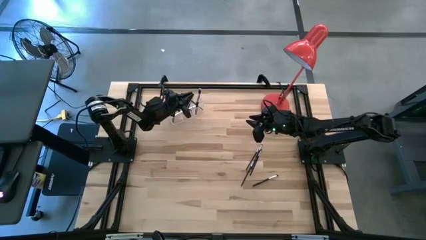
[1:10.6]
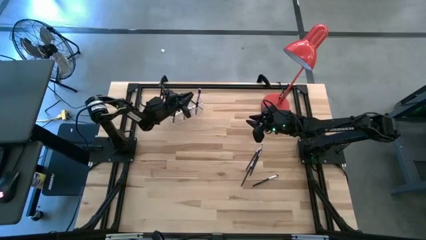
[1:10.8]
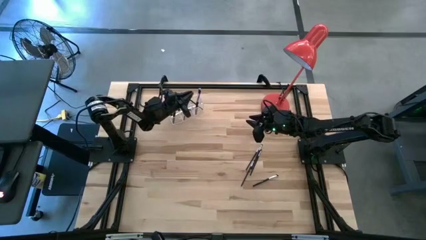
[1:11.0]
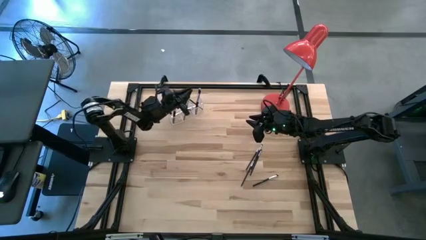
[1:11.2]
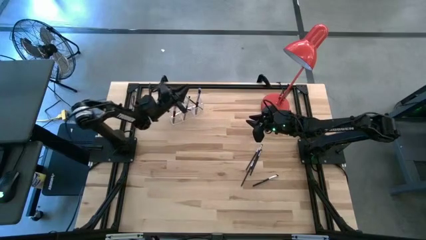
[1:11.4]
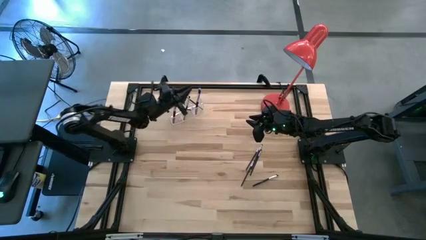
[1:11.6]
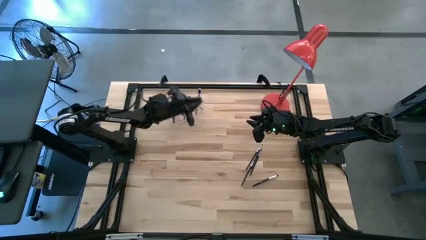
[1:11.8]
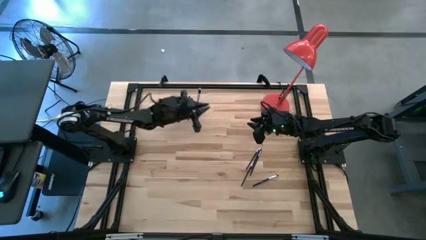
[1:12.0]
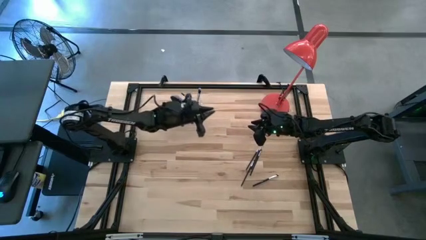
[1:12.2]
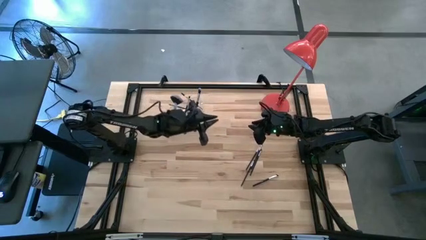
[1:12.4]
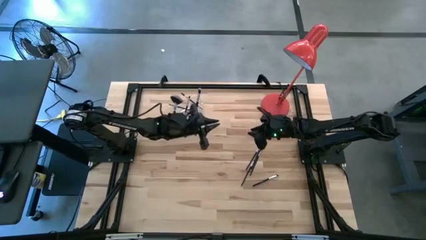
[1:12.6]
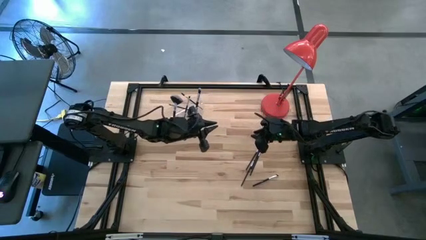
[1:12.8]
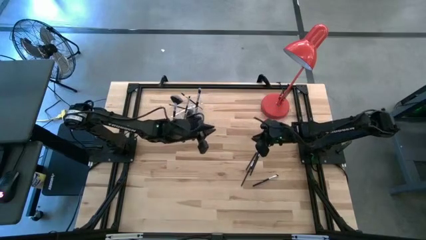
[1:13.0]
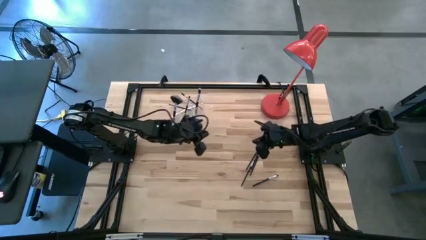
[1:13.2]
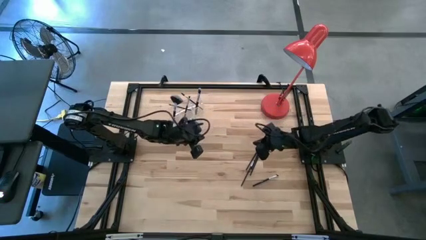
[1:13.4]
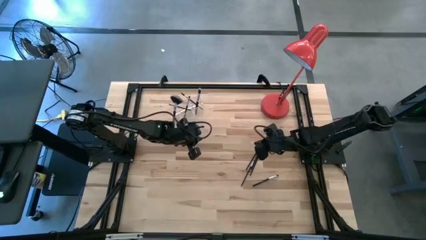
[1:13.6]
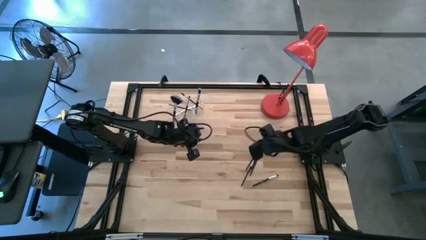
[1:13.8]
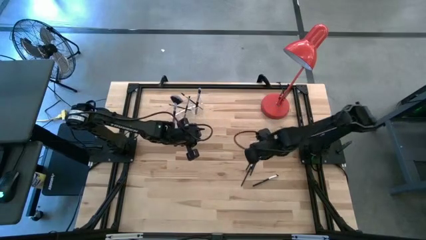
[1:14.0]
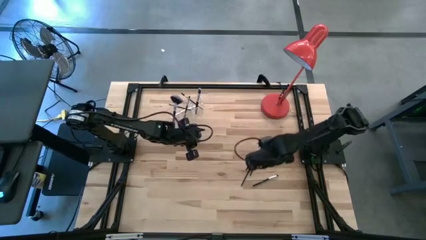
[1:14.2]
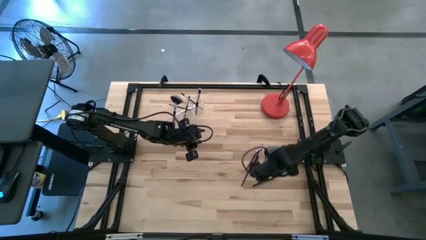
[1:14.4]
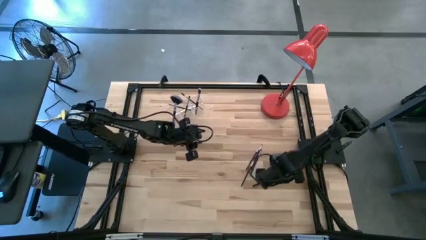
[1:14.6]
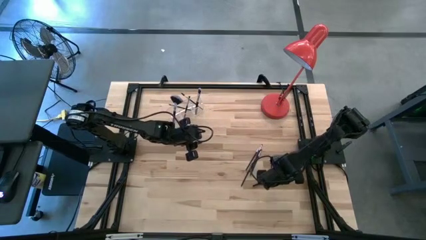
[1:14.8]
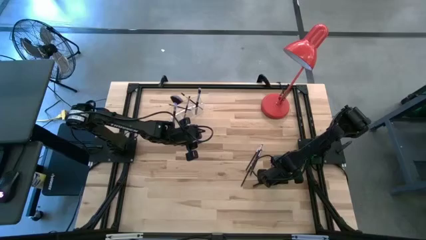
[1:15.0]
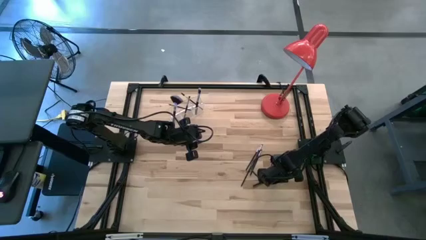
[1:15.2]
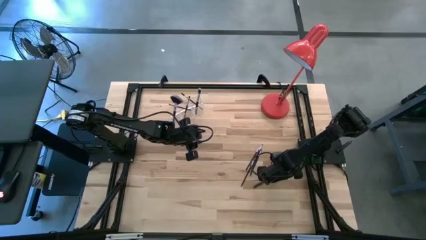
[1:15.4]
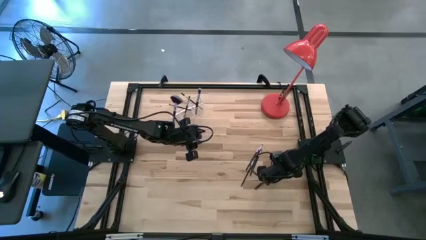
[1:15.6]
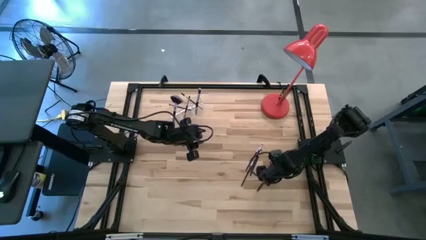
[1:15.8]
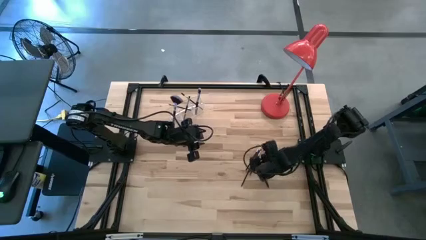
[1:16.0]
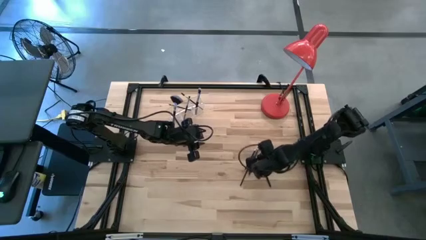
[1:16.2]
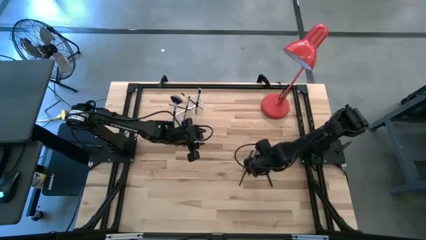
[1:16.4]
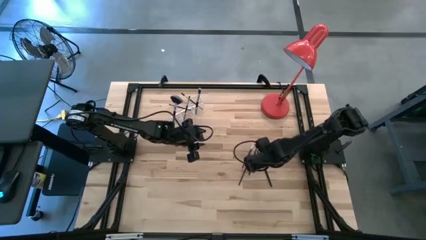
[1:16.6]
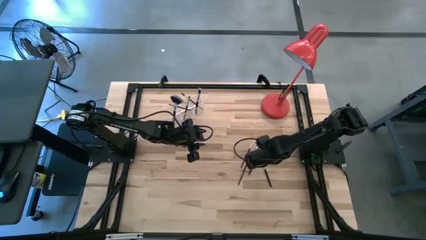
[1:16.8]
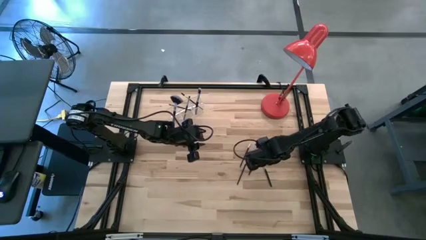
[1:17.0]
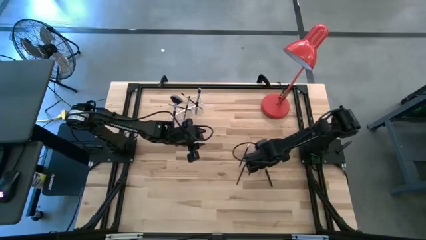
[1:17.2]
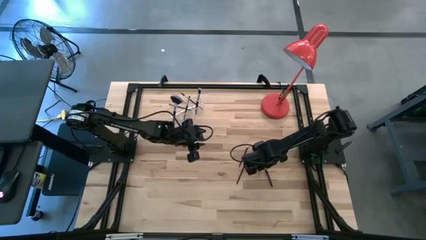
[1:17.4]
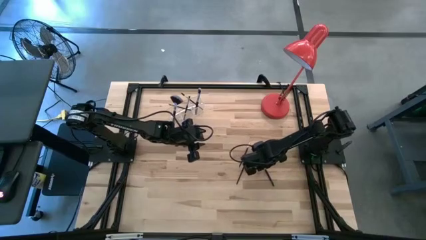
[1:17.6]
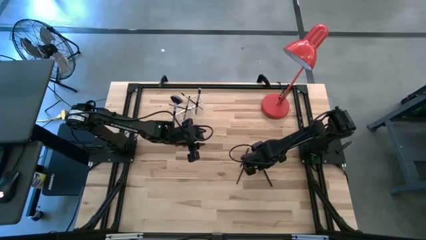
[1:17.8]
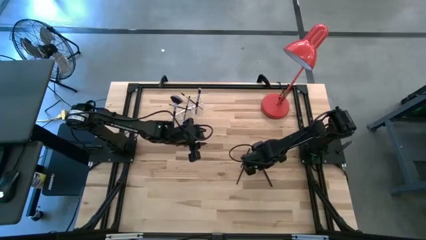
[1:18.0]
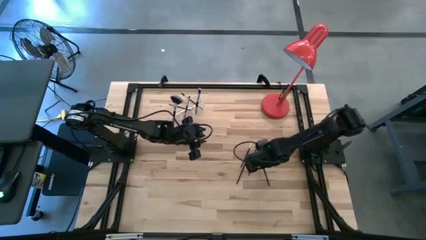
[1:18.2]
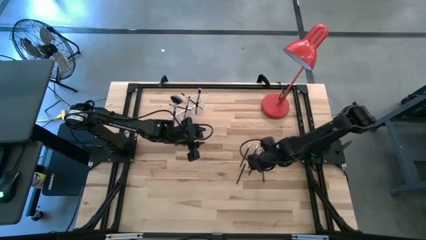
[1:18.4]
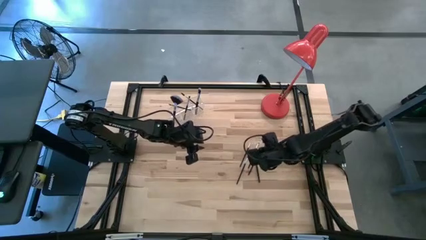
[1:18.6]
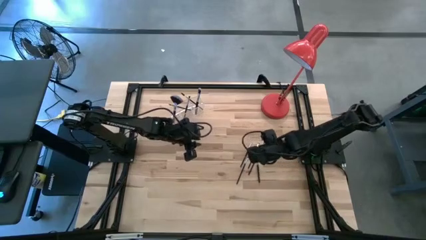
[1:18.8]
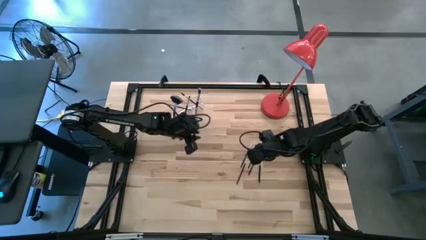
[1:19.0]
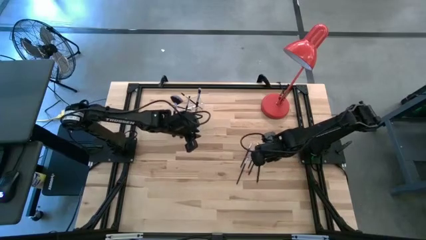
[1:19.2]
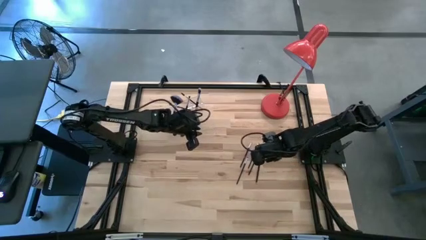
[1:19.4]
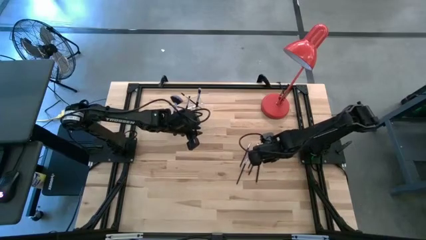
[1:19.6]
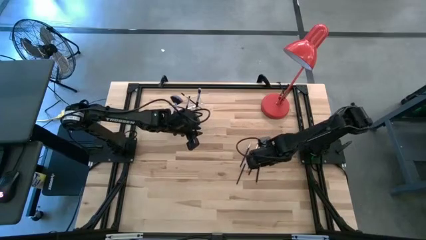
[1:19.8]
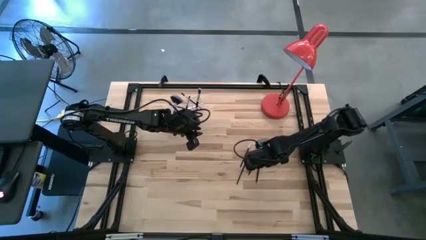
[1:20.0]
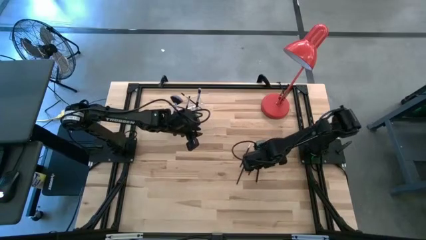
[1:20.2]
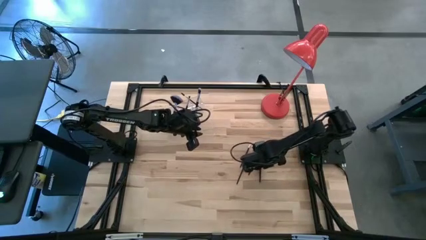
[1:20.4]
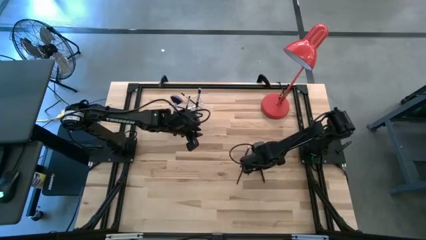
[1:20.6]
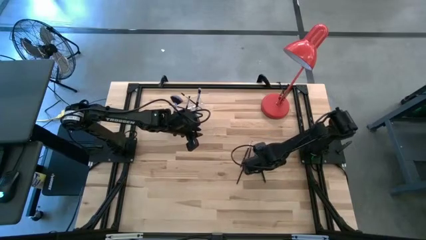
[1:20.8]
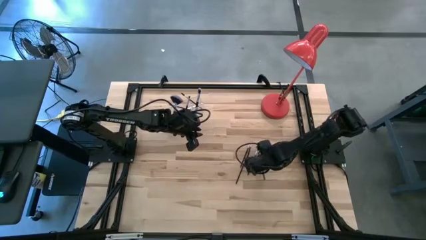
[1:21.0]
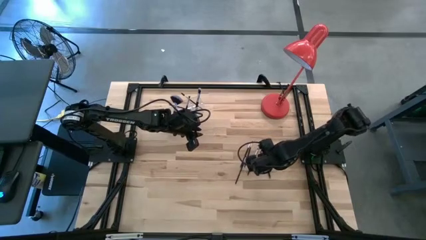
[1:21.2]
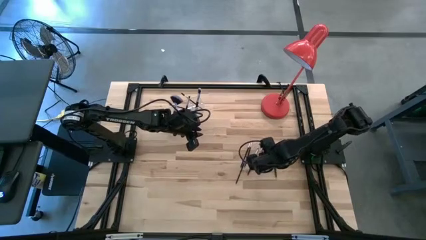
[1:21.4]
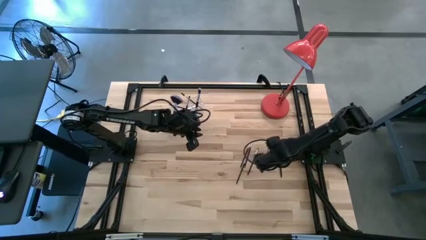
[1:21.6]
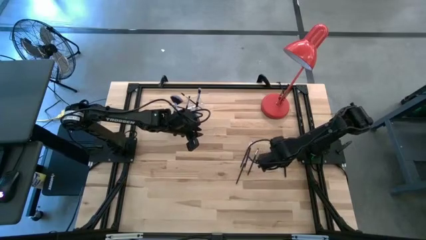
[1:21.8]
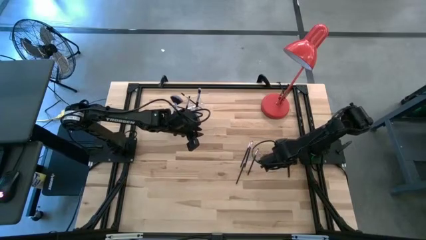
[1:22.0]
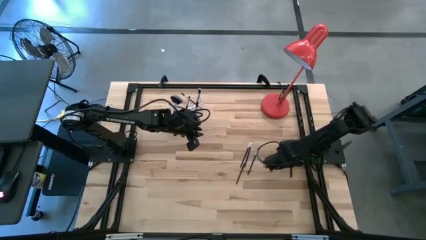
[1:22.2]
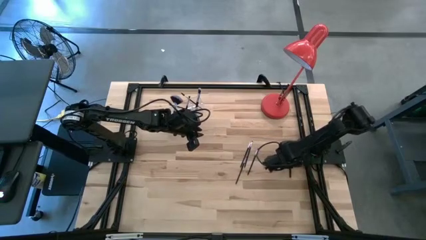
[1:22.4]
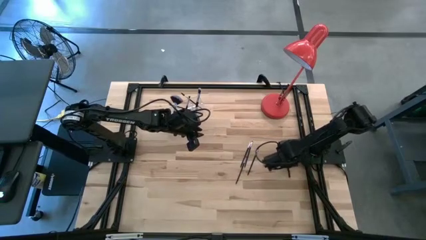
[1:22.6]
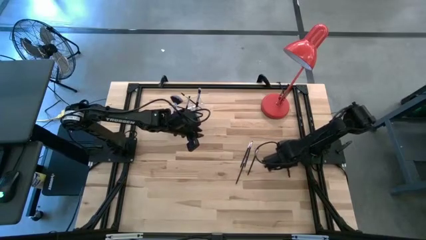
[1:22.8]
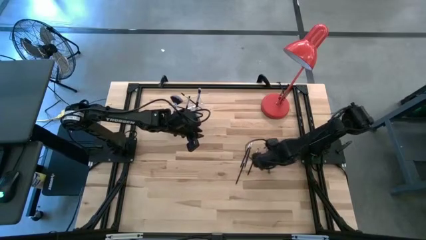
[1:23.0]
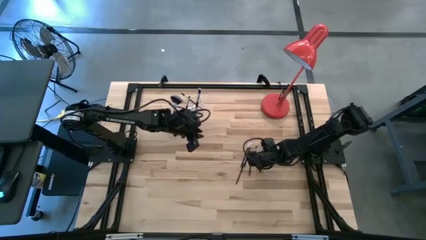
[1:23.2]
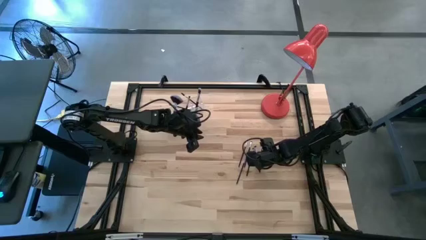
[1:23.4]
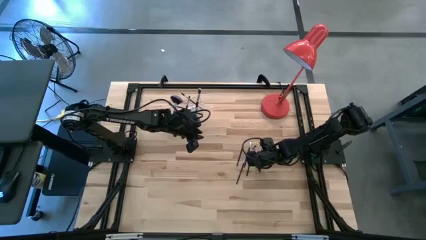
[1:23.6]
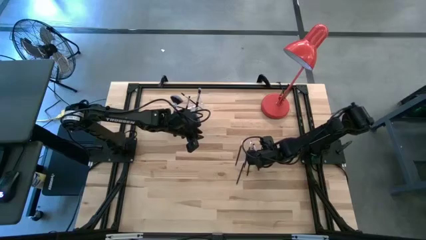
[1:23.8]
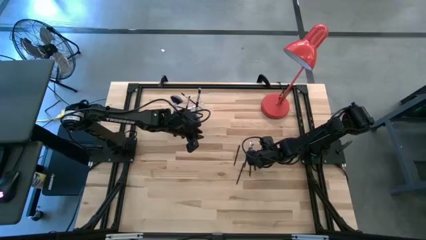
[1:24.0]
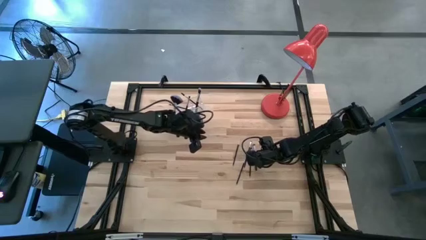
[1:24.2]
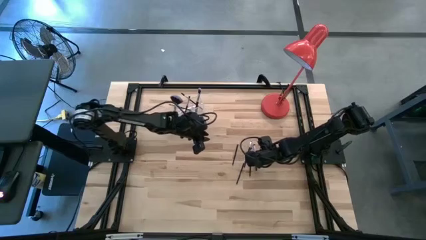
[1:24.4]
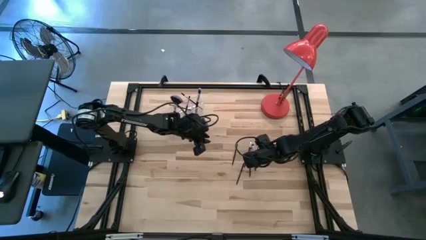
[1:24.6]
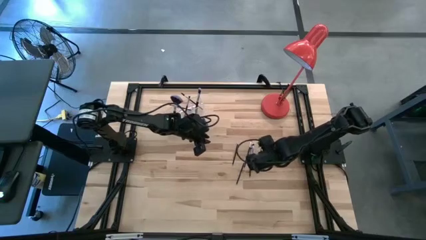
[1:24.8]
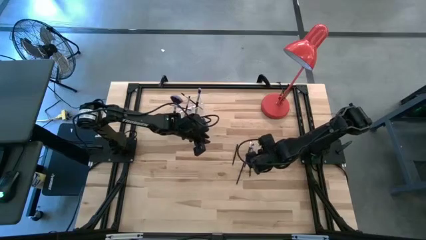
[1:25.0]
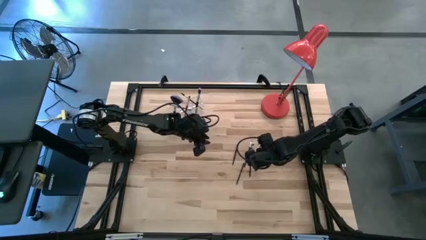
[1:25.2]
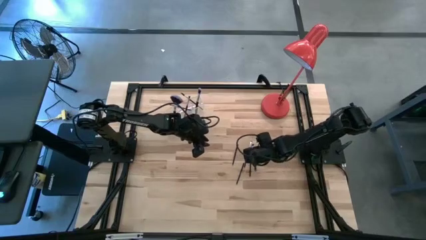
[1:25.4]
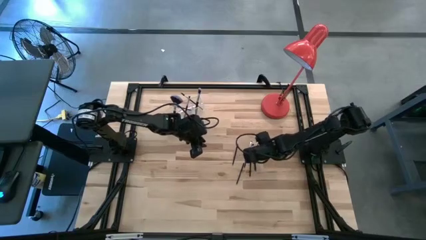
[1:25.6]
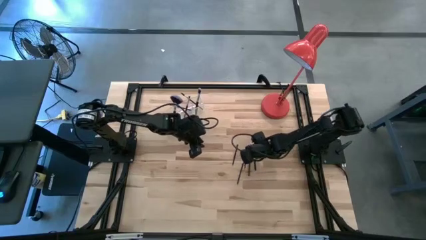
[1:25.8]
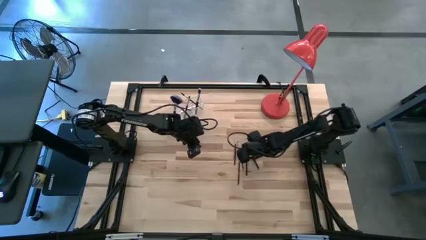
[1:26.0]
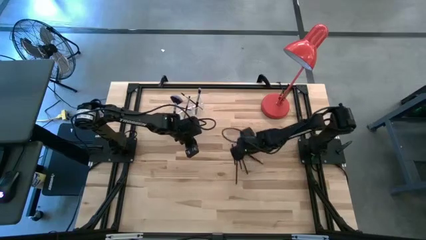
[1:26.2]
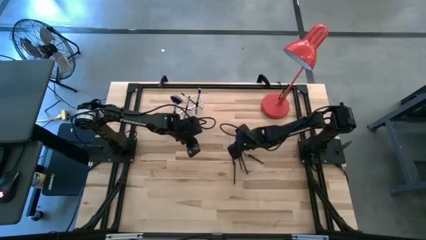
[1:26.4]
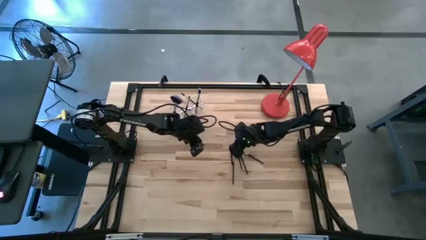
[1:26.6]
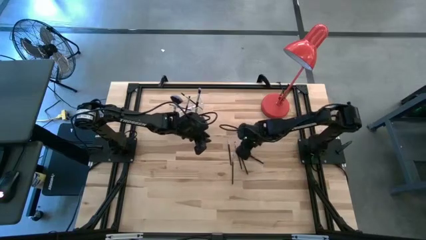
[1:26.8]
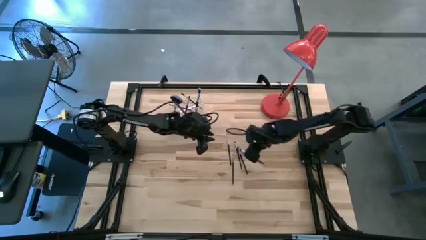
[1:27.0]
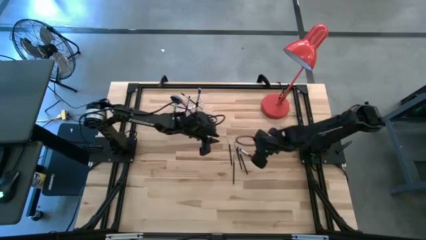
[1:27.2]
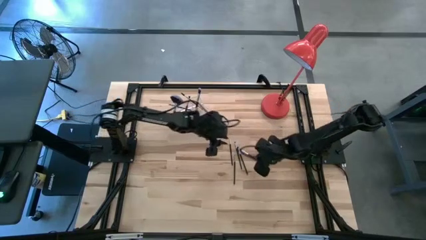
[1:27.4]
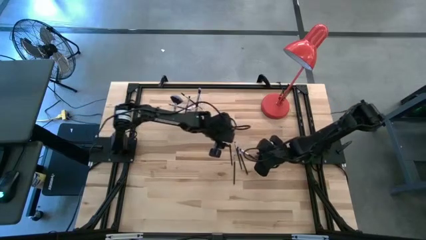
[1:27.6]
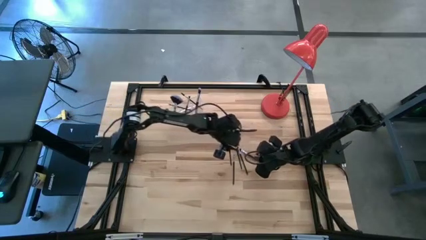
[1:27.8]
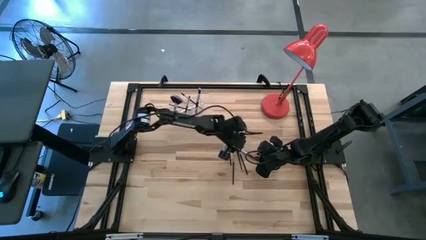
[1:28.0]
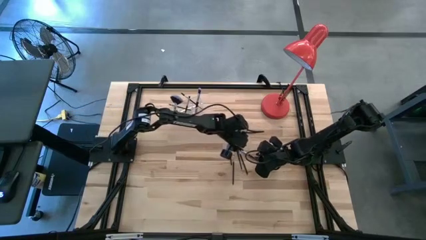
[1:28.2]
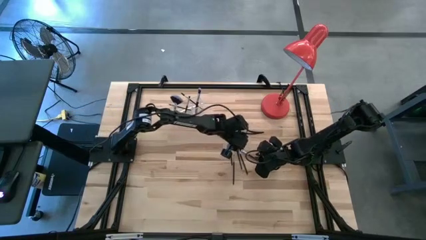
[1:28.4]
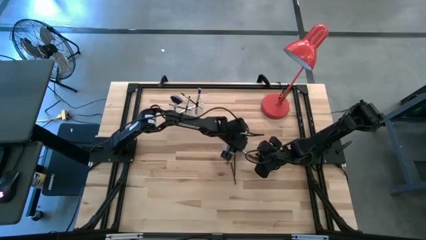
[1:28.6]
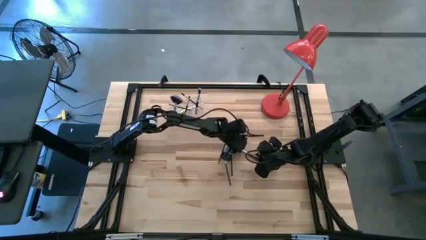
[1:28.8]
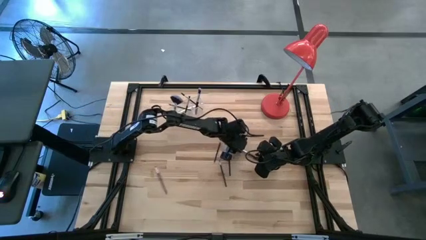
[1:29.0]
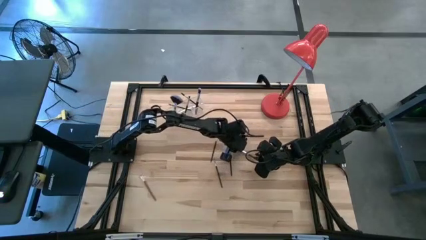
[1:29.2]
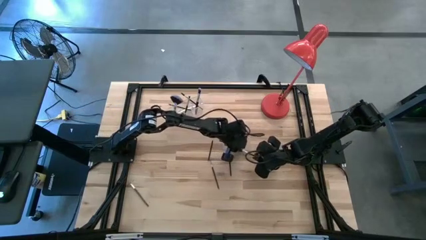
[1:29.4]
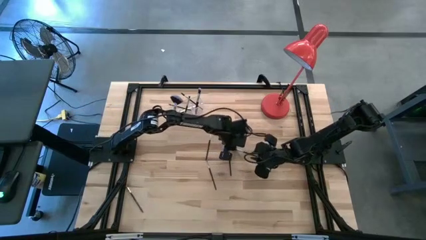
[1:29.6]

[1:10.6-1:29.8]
Task: Put items in baskets/containers
Put the eyeshadow brush into the transparent organizer
